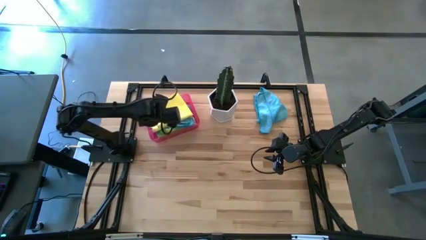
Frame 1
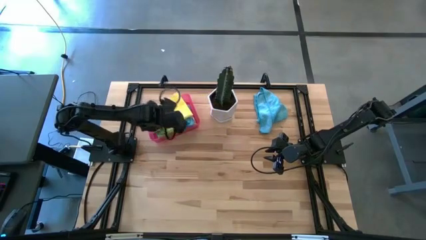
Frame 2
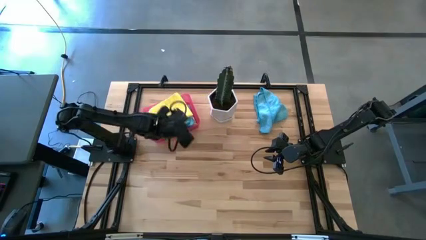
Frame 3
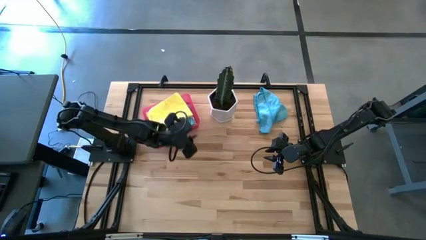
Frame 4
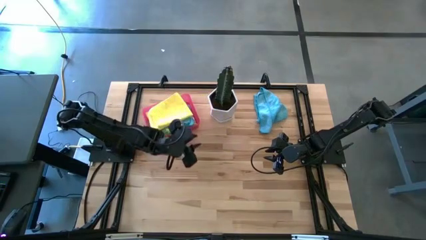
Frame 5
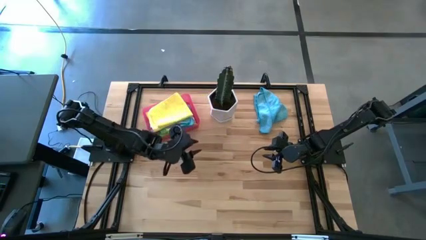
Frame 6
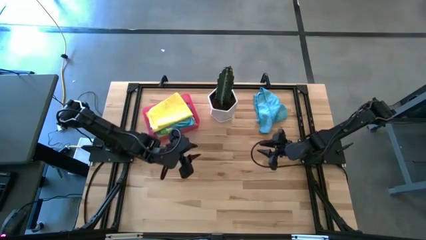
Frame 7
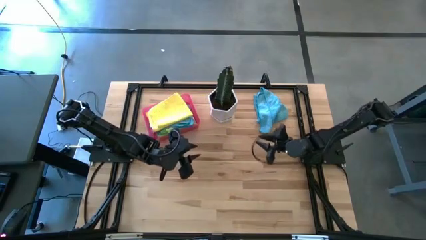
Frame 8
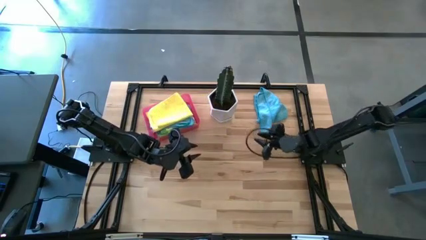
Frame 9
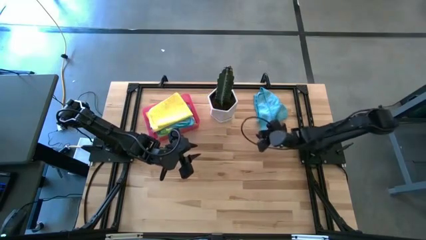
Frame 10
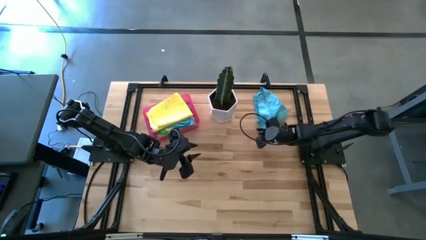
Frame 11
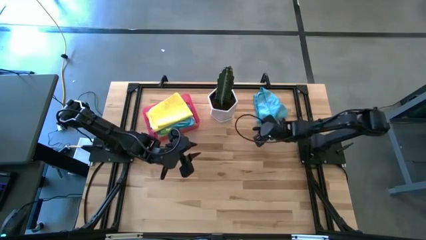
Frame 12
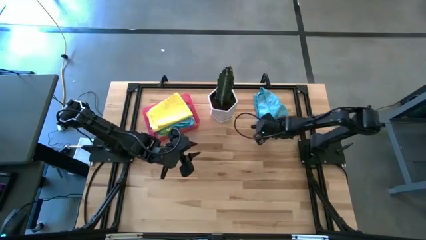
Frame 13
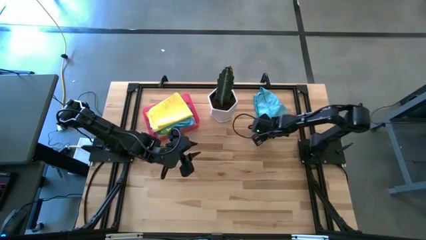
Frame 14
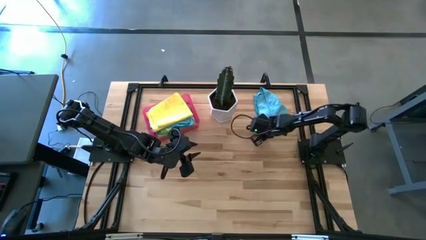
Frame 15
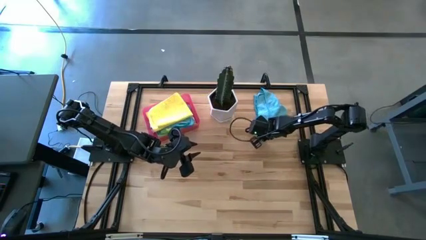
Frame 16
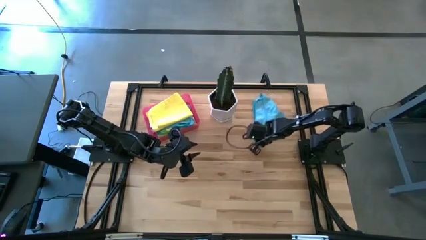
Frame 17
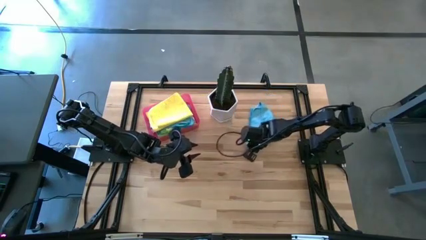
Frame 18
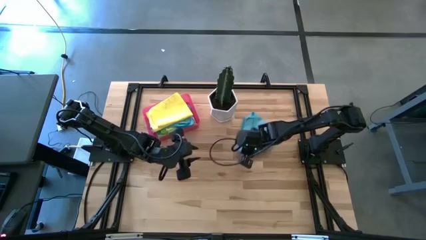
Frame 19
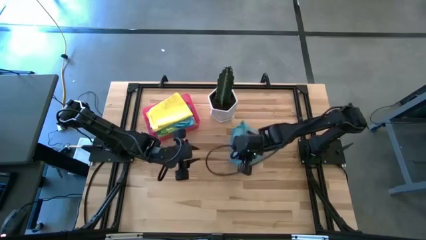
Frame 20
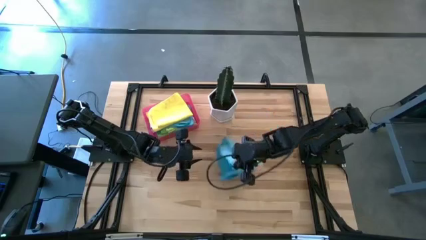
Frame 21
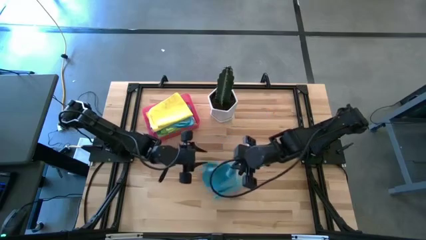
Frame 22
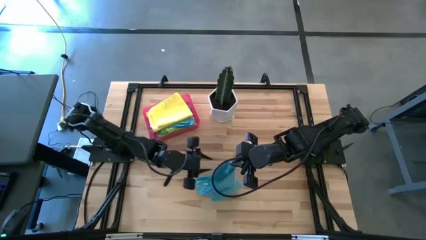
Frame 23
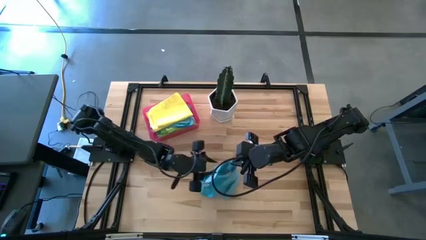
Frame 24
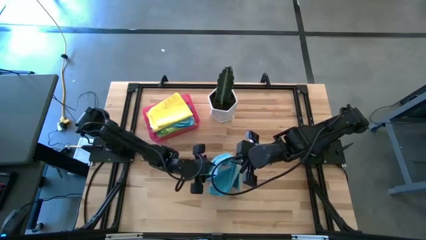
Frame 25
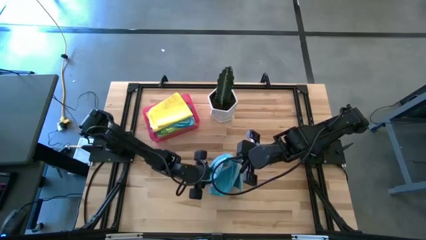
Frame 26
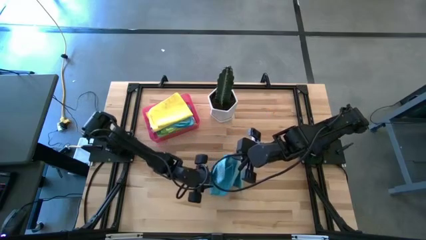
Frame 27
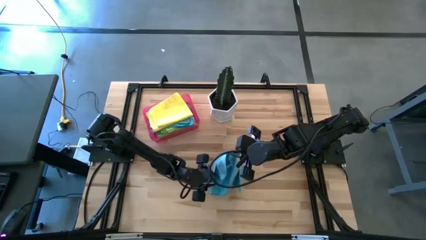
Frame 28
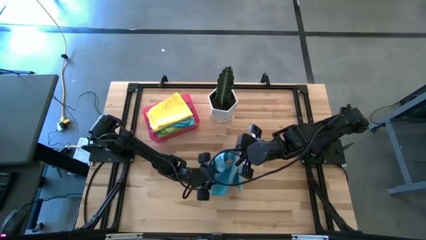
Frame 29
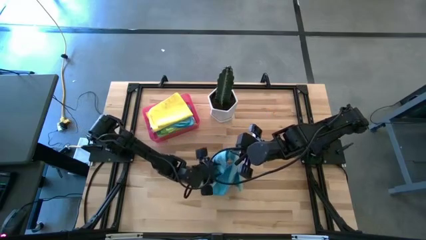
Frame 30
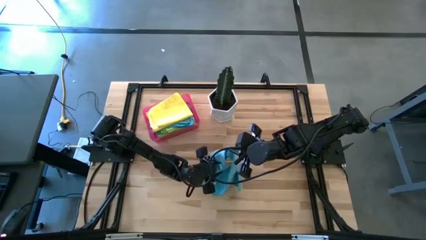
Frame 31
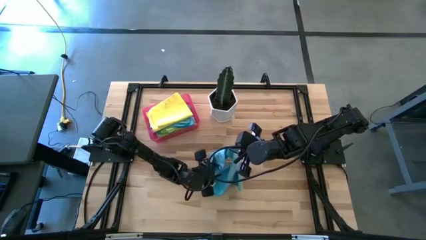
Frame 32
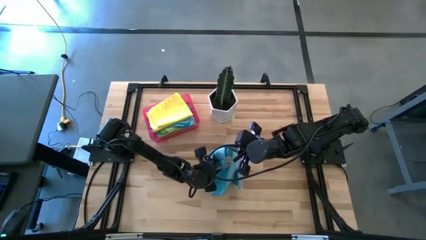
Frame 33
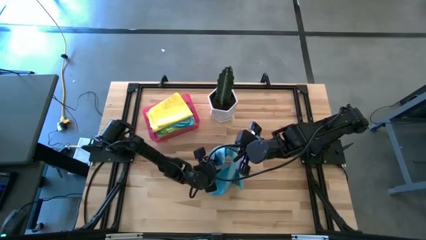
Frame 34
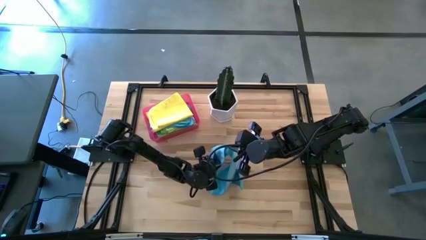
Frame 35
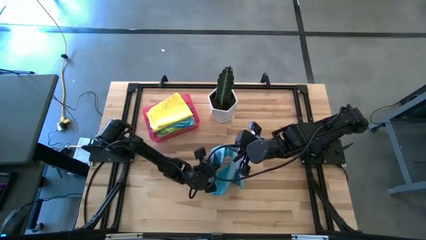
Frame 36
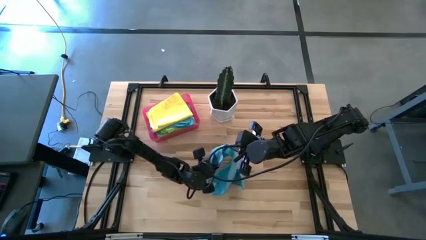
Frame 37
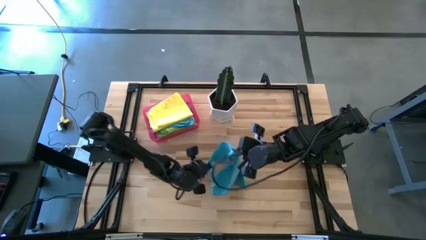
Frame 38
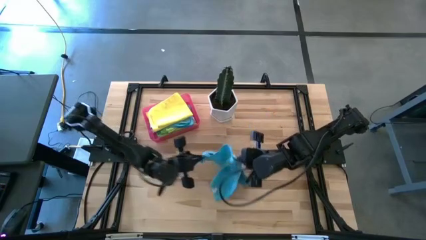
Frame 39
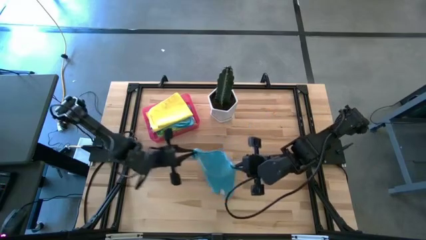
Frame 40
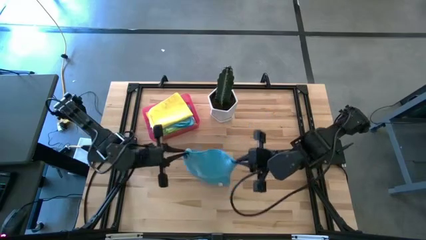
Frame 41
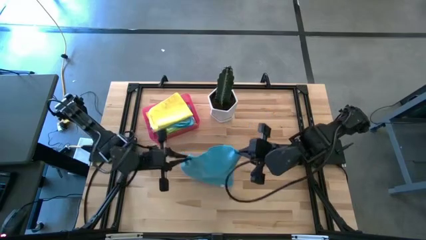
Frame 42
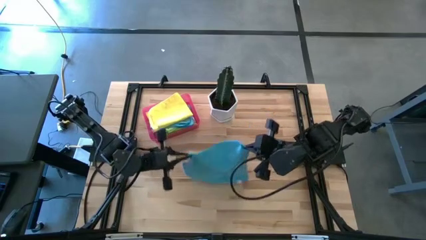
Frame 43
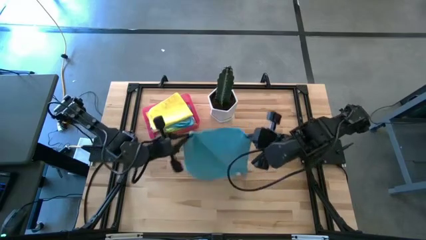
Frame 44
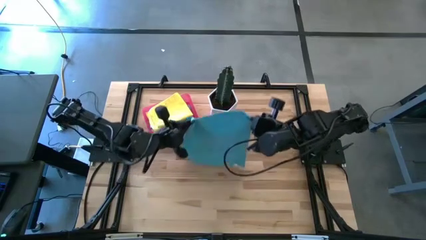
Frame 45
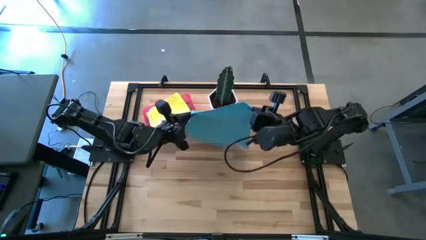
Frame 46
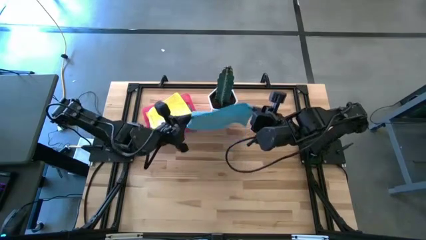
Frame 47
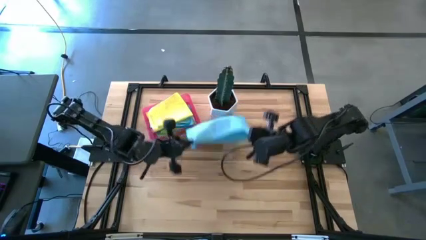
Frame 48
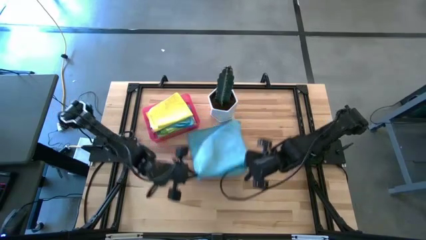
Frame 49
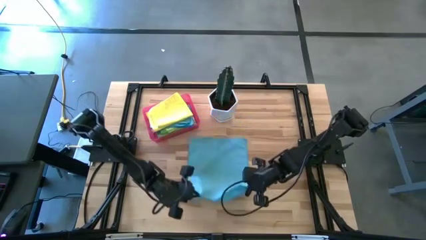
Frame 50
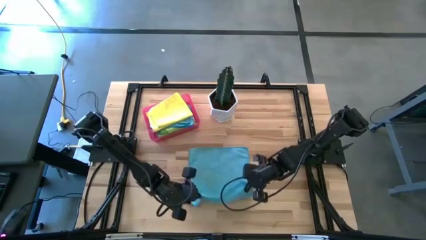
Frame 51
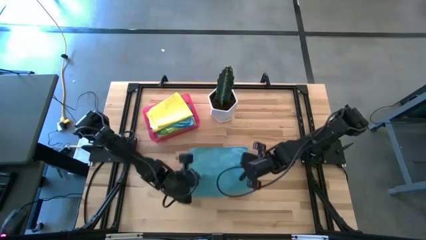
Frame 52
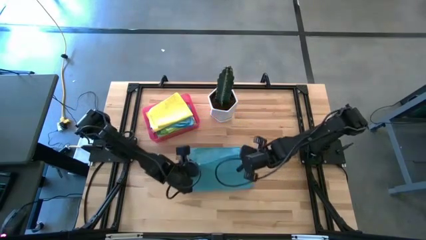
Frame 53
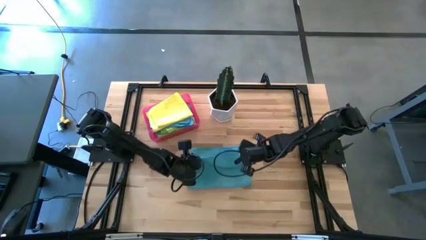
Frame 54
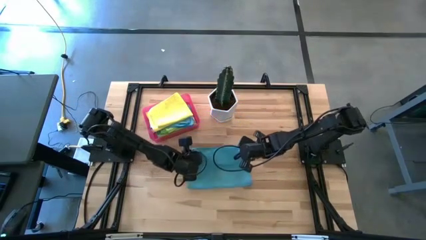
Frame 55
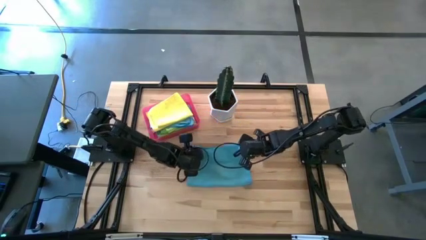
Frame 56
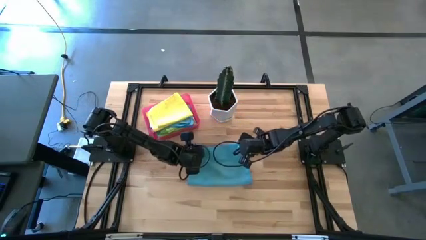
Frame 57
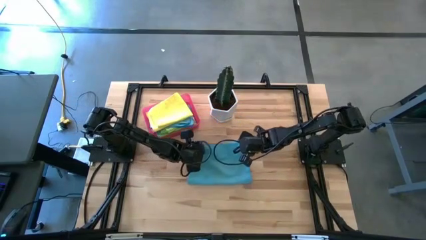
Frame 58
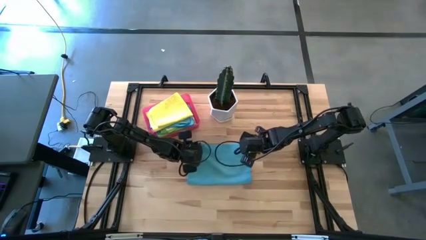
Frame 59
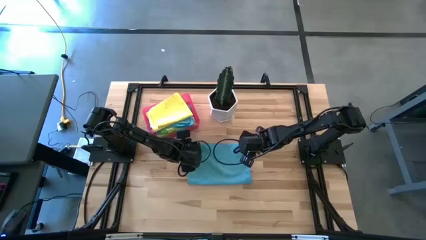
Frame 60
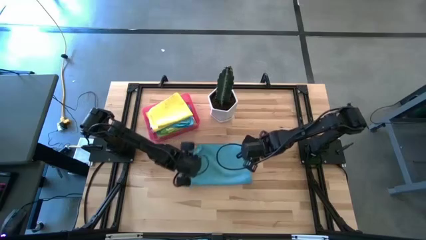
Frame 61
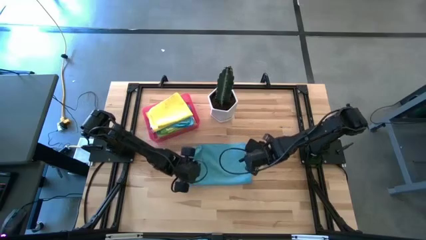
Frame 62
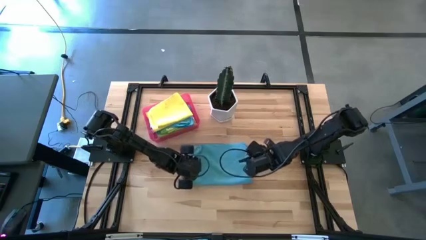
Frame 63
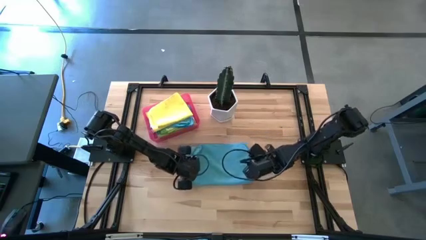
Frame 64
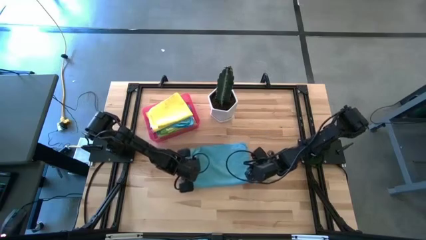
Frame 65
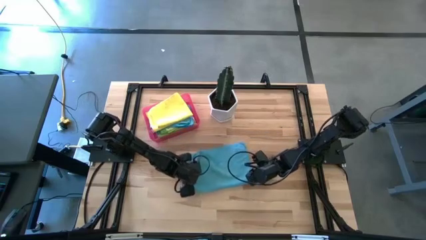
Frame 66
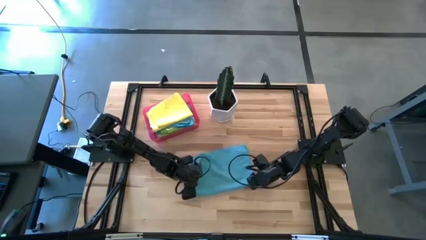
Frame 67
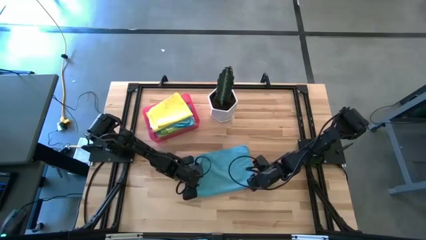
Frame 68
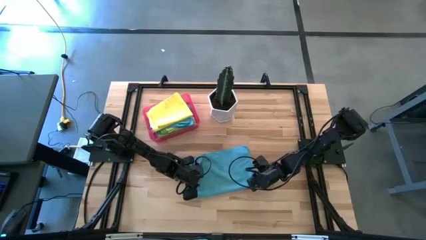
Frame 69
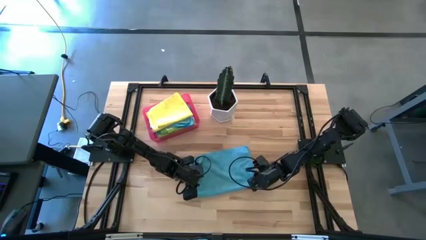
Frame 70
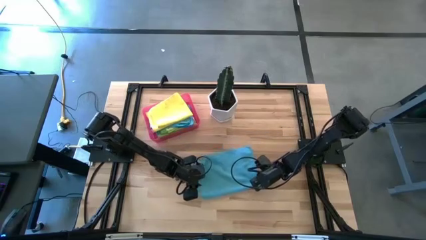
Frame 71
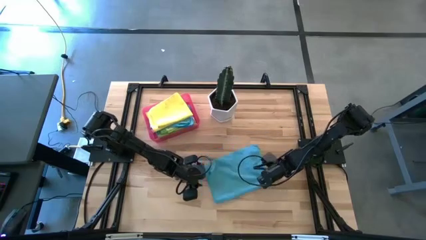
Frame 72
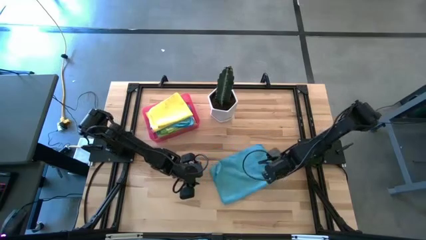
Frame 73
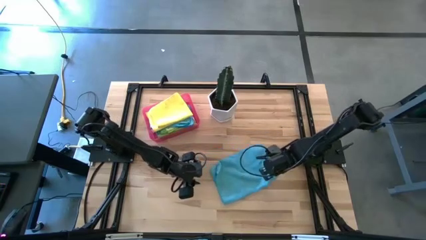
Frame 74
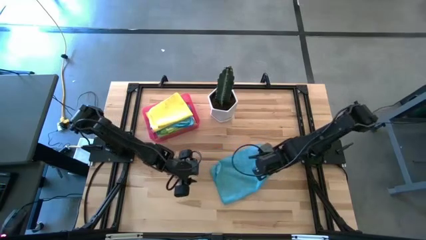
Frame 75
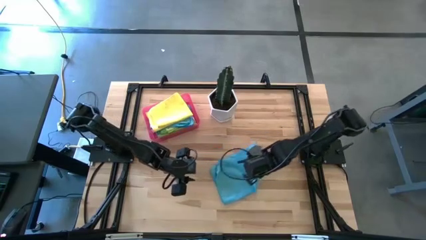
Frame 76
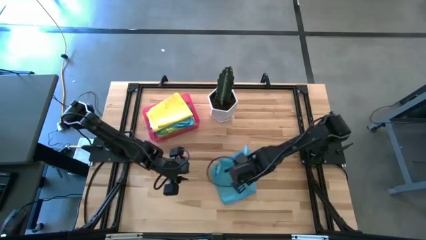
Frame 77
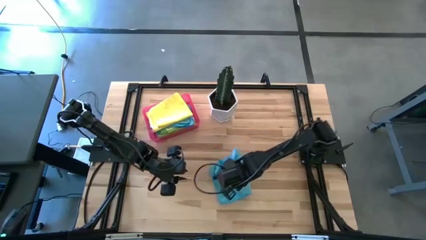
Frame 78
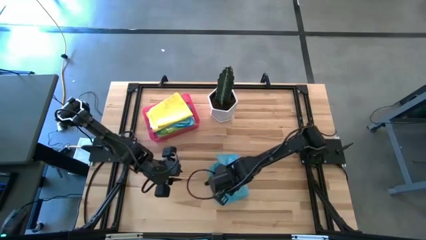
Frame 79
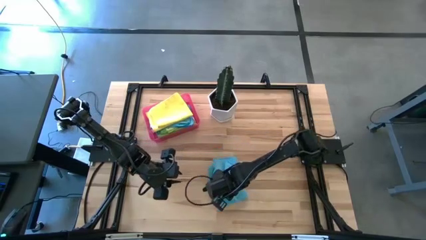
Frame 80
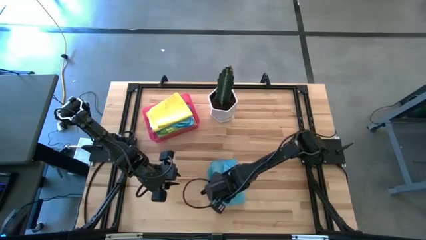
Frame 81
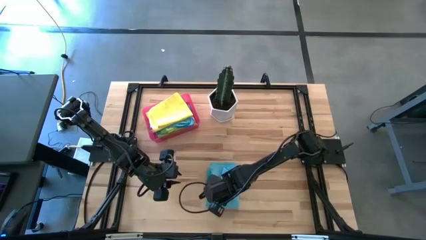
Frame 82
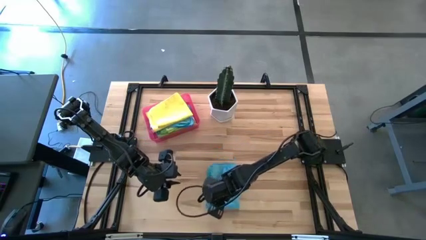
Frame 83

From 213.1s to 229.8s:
Task: Fold microfiber towels
Fold the blue microfiber cloth
